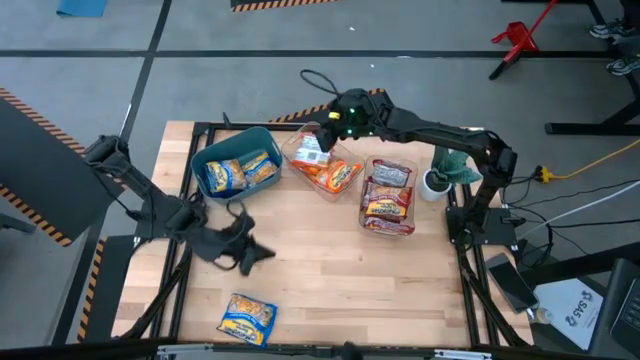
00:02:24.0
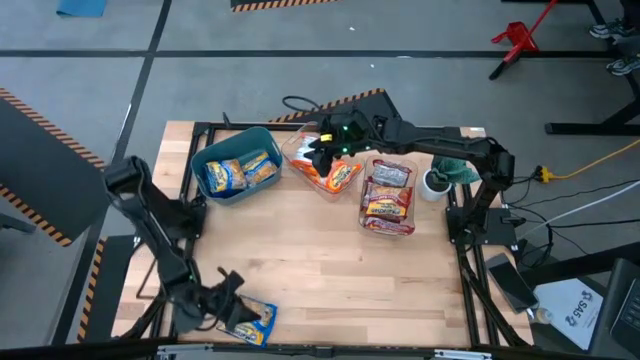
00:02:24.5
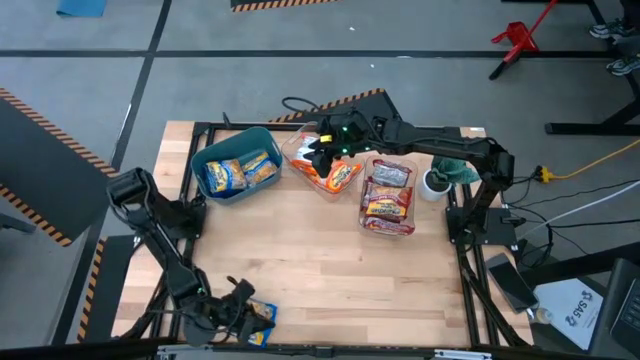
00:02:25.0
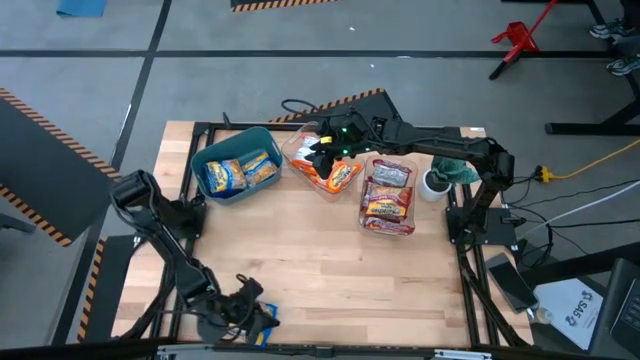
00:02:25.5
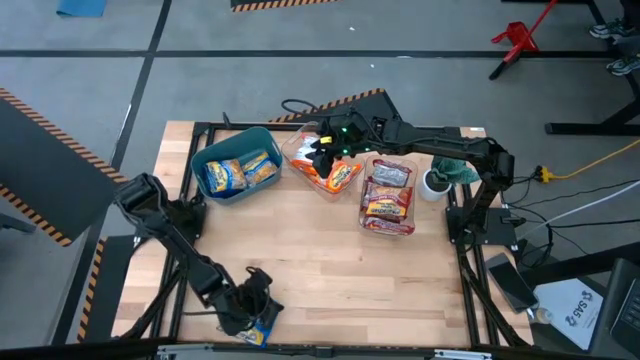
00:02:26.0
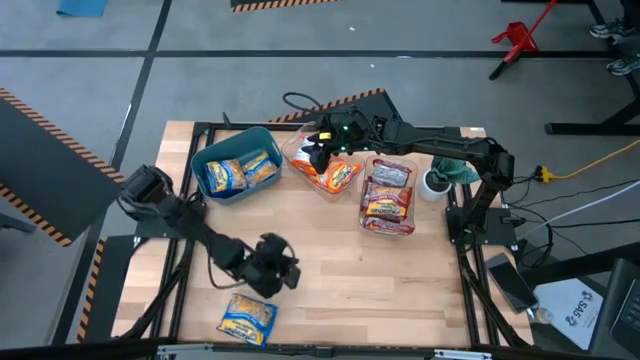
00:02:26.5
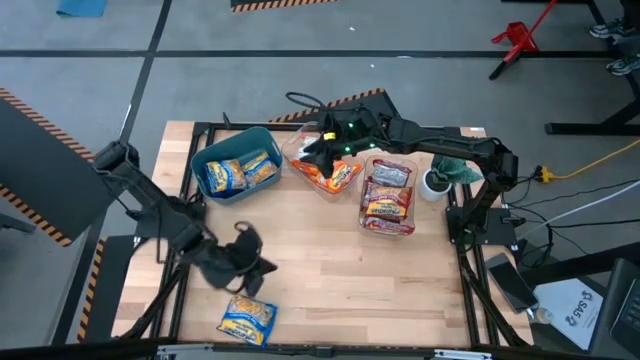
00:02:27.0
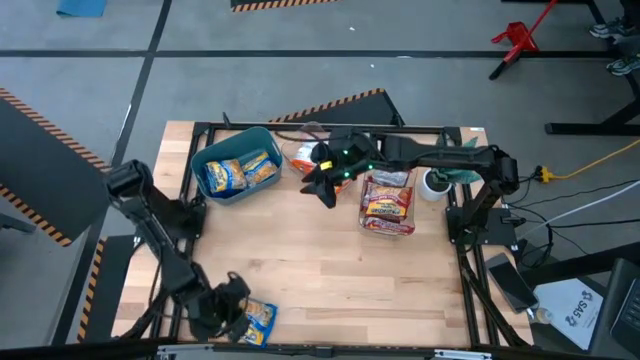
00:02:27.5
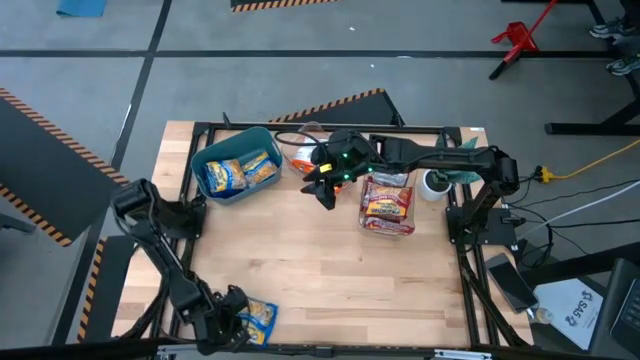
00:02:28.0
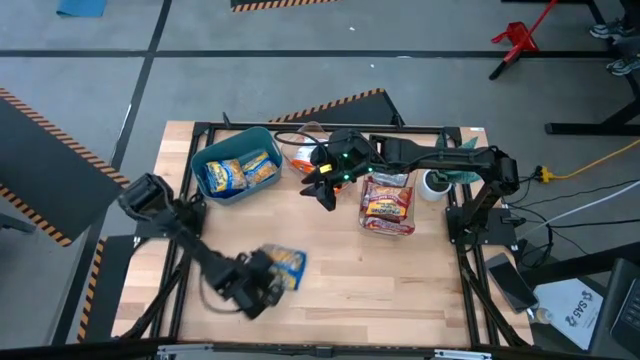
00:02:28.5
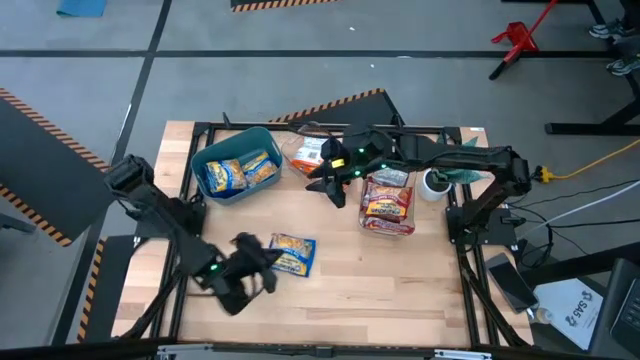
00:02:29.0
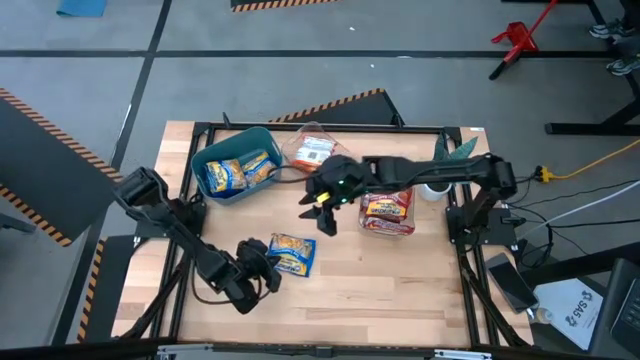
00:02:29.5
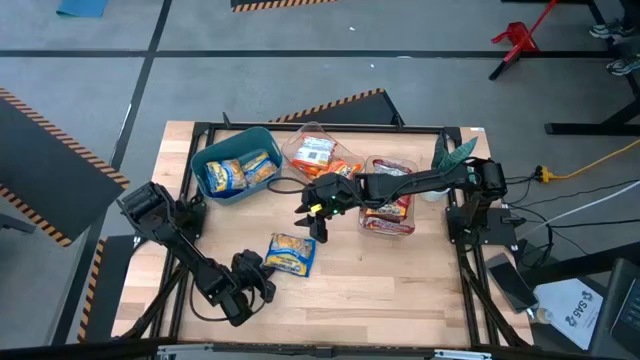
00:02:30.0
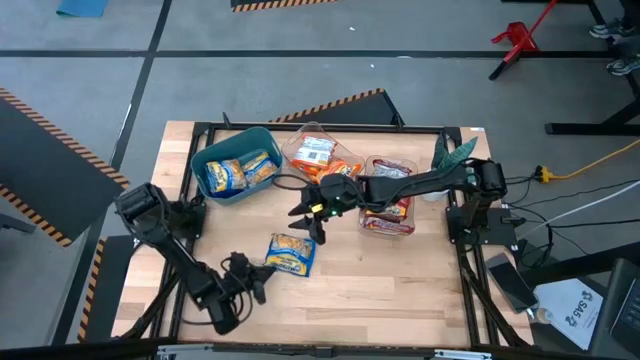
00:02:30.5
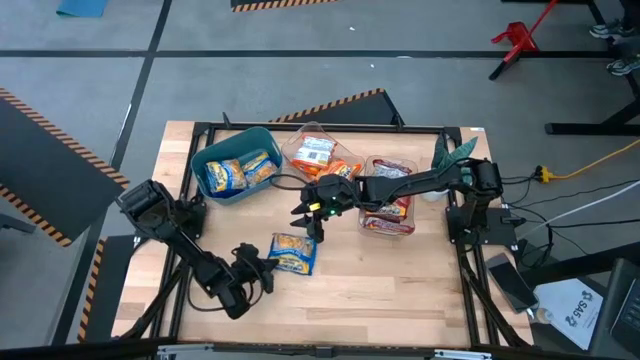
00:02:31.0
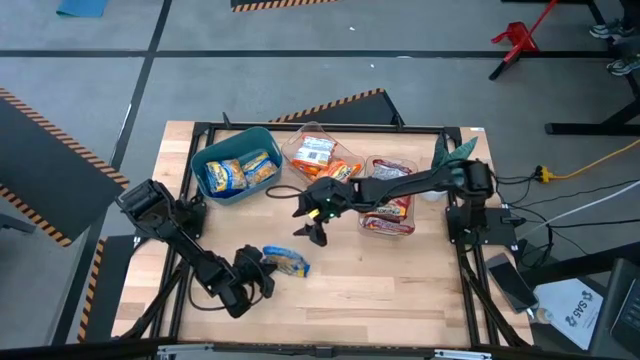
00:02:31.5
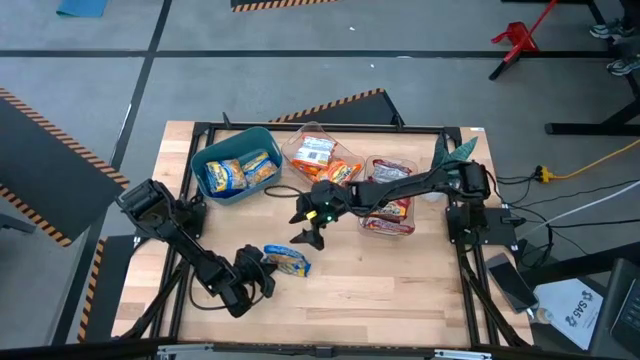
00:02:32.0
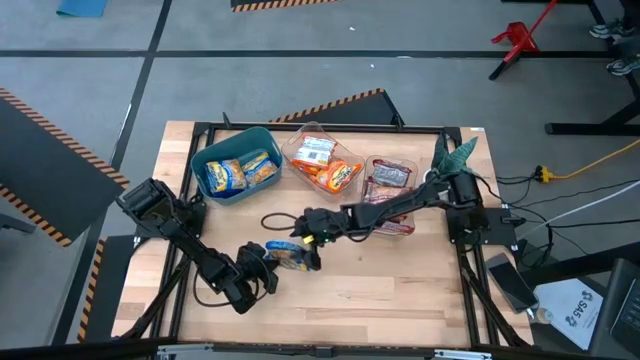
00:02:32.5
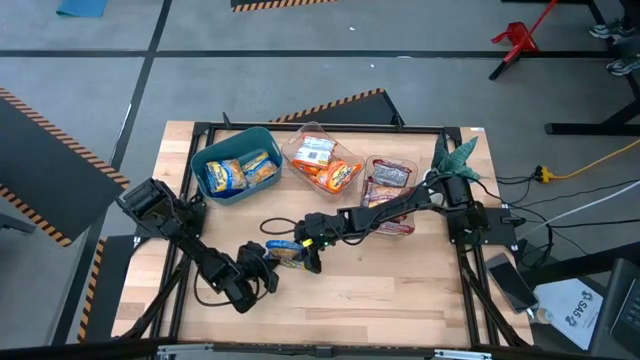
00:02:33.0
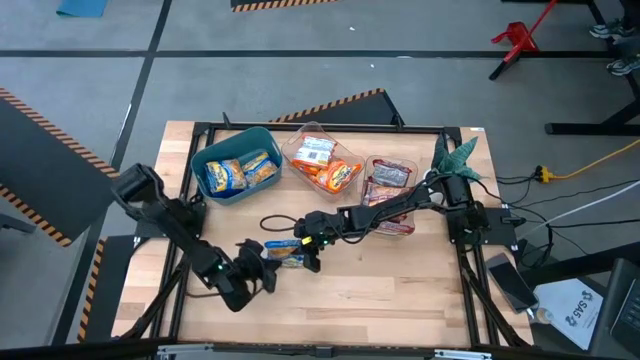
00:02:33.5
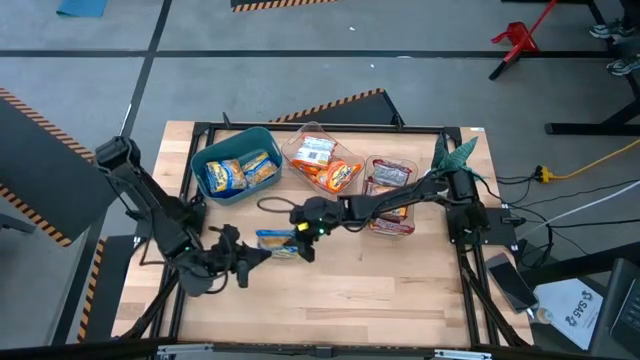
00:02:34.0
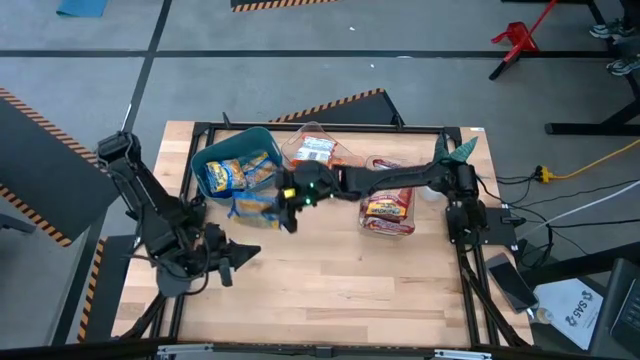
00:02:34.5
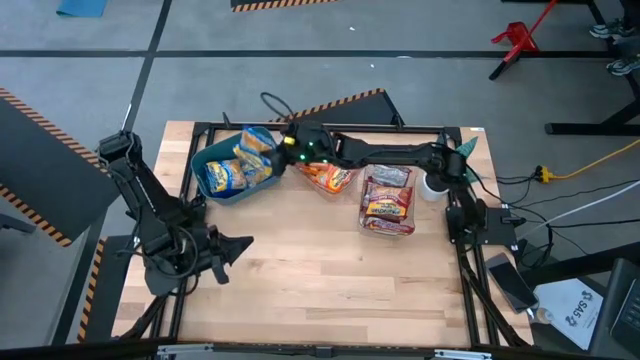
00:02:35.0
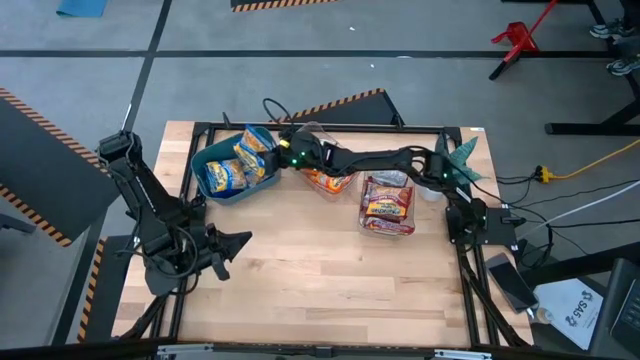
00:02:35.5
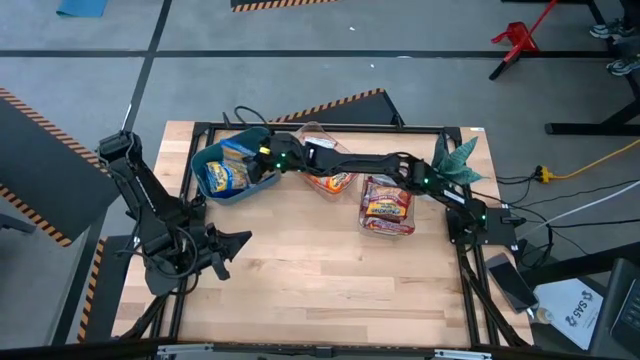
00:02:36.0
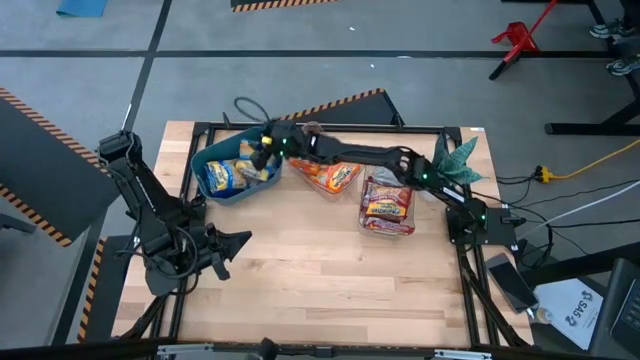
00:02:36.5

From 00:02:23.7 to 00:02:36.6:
Task: Sort Maruchan noodles
Put the blue noodle pack into the blue bin

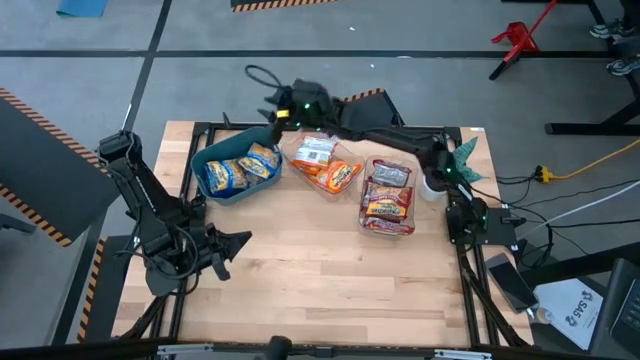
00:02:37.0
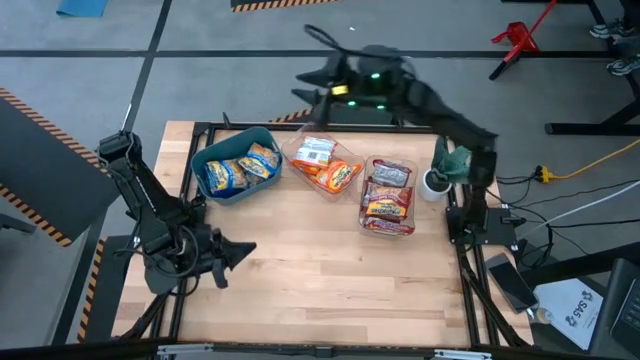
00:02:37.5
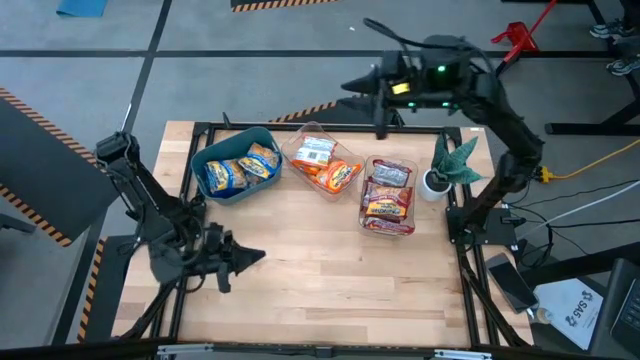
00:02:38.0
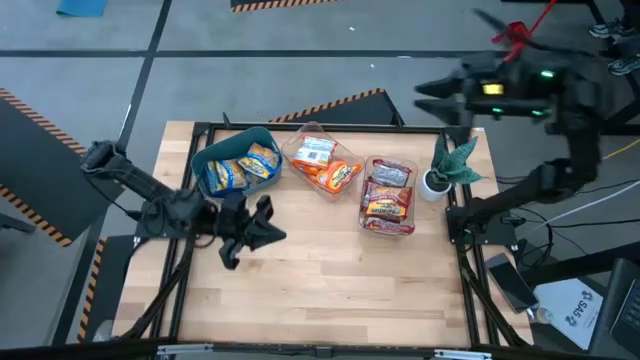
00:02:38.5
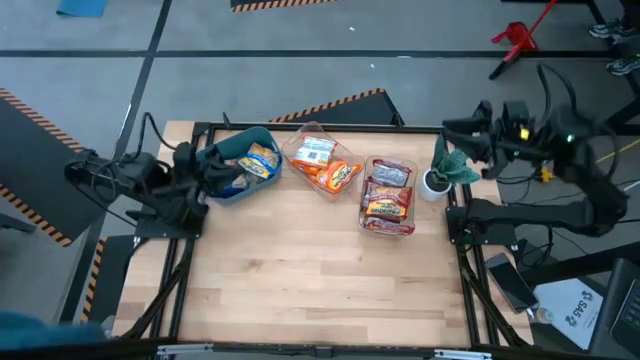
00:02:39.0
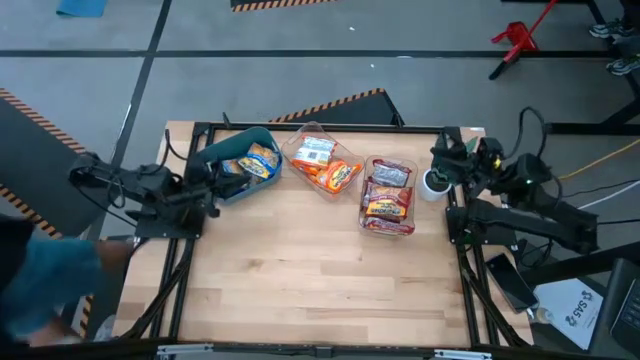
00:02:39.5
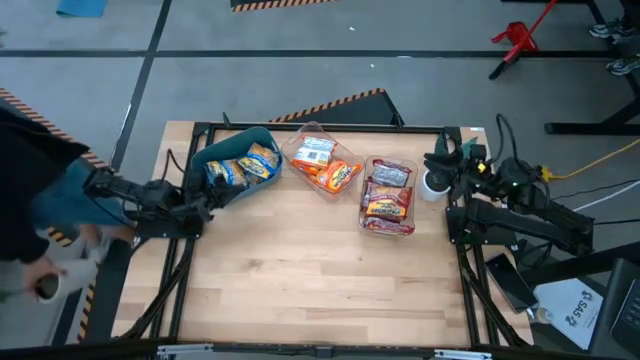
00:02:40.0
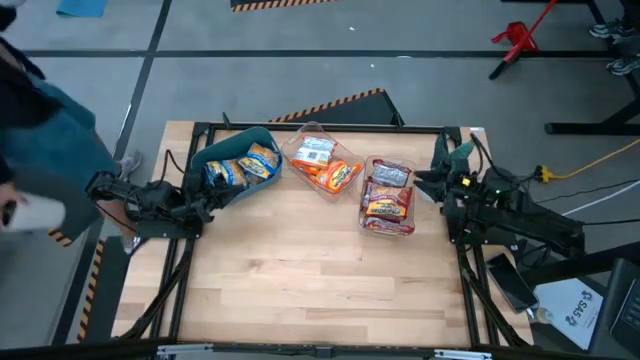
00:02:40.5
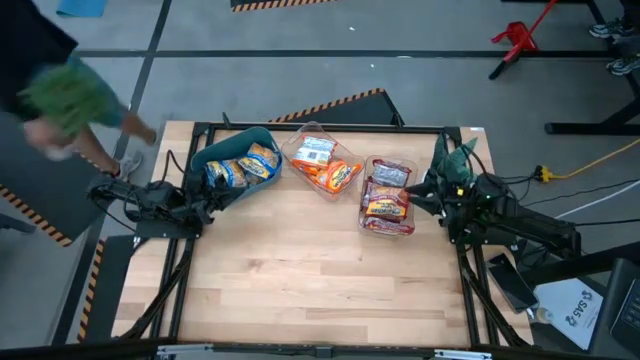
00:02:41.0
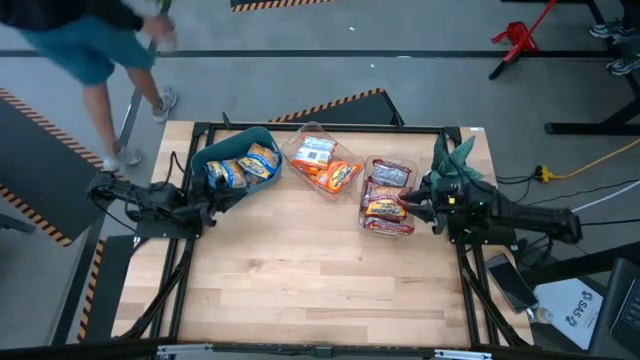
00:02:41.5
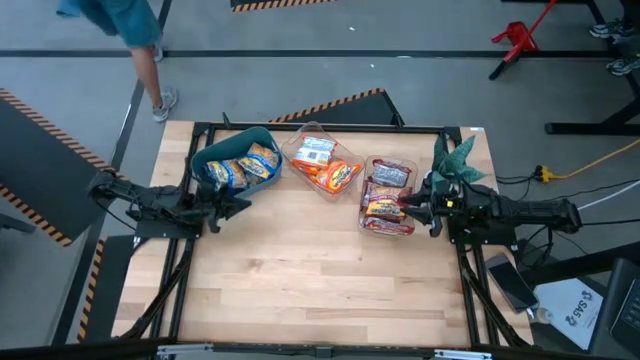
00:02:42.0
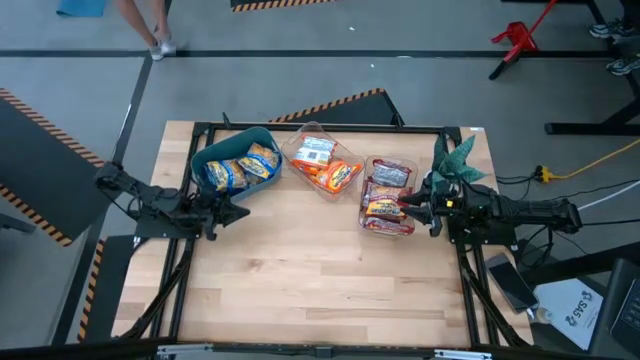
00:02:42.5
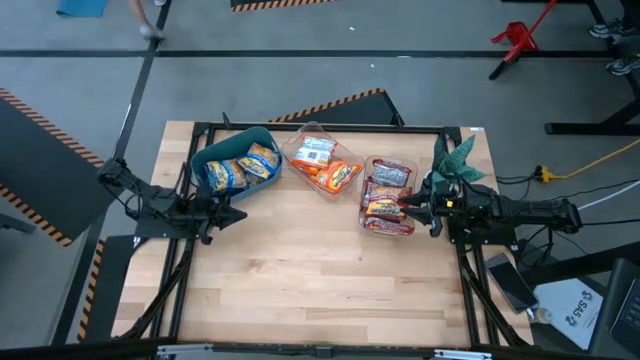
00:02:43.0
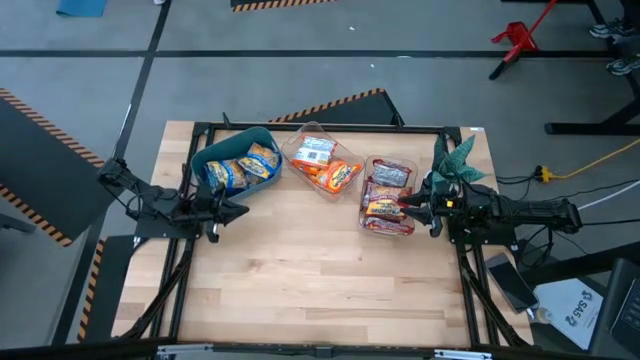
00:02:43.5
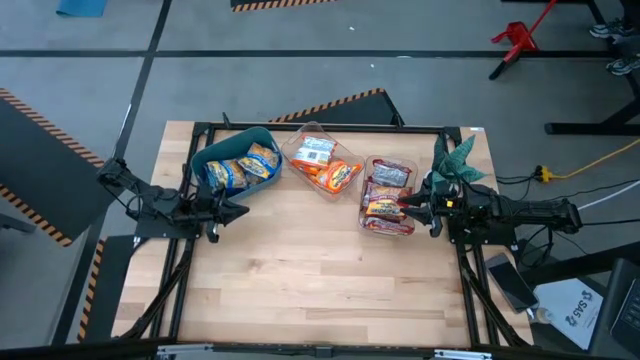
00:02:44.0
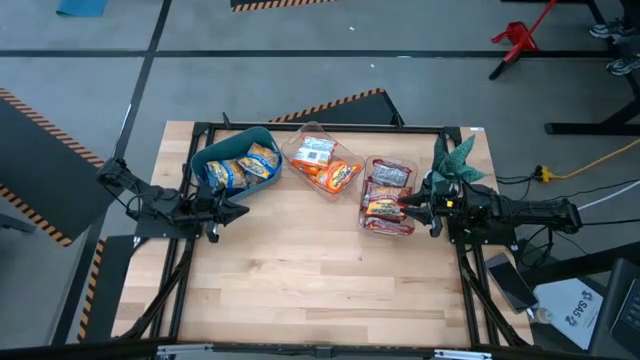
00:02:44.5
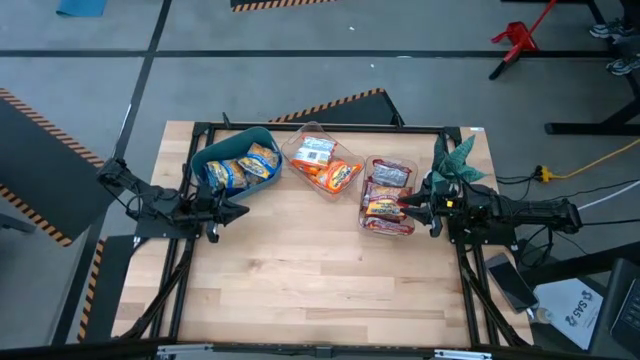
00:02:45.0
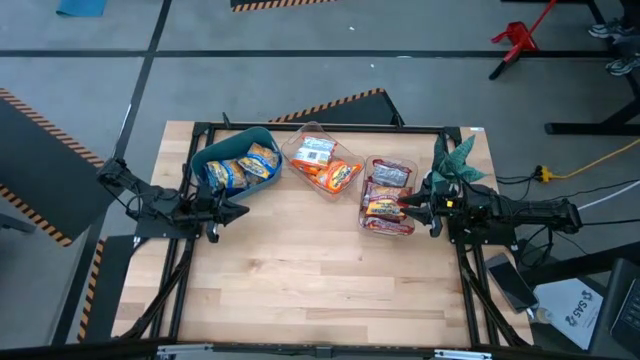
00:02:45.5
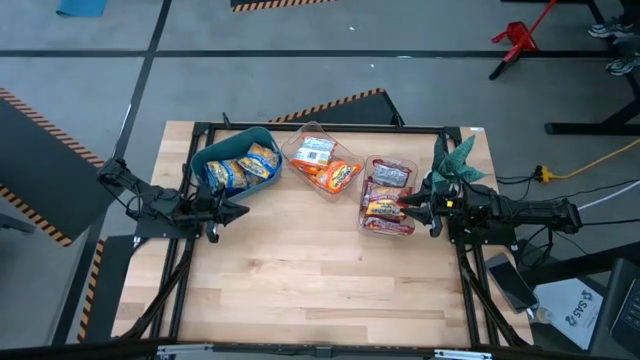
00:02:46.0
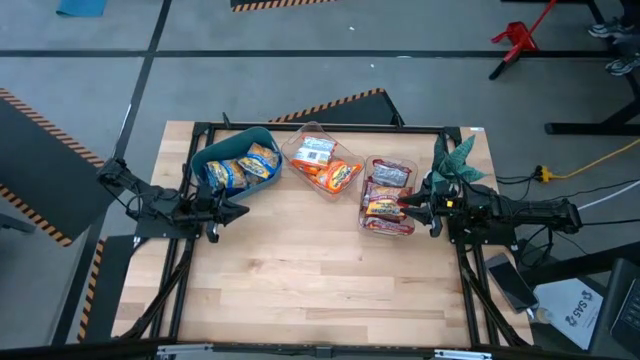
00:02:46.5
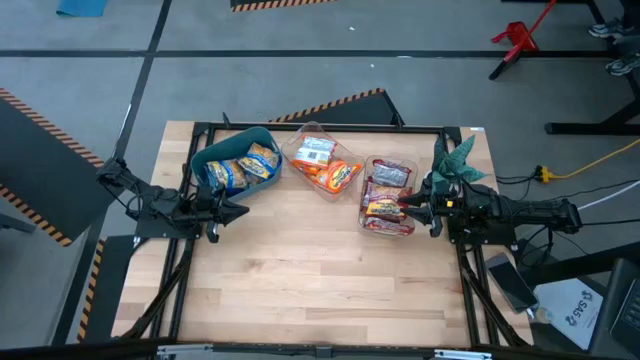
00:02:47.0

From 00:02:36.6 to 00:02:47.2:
Return to Home Position
